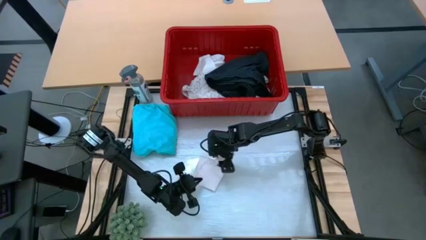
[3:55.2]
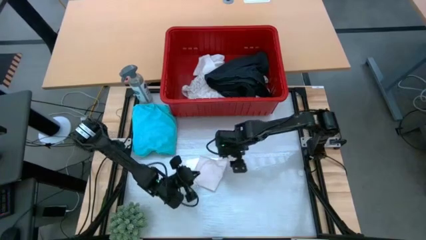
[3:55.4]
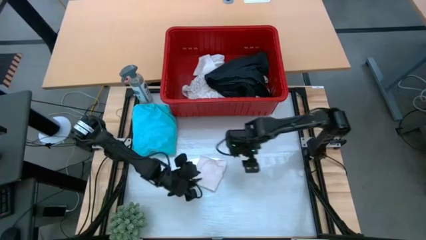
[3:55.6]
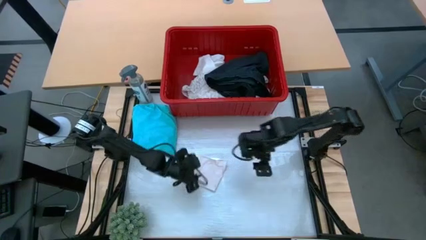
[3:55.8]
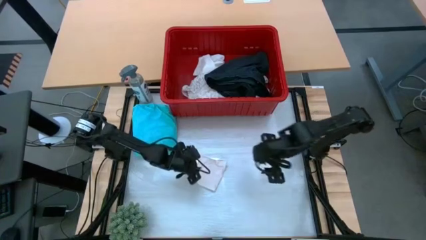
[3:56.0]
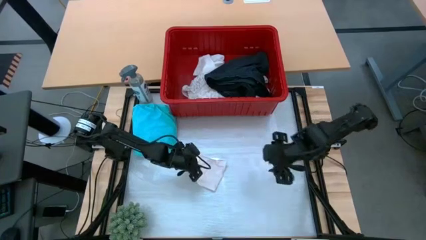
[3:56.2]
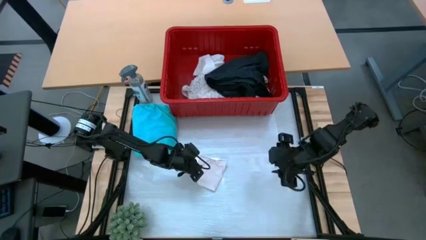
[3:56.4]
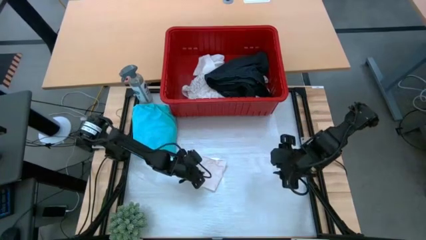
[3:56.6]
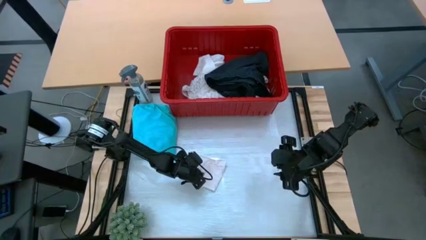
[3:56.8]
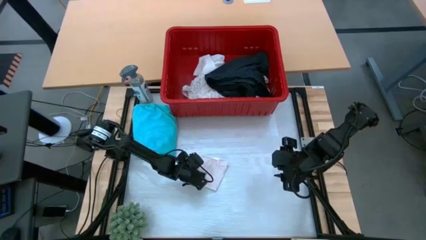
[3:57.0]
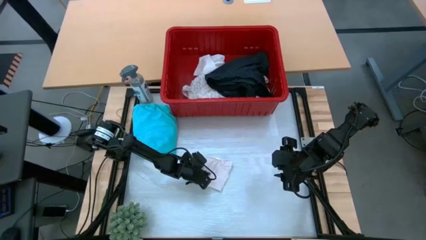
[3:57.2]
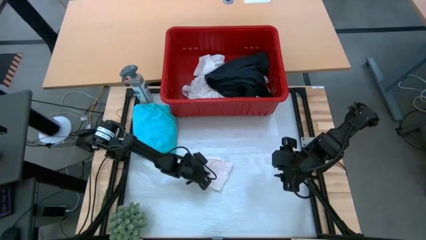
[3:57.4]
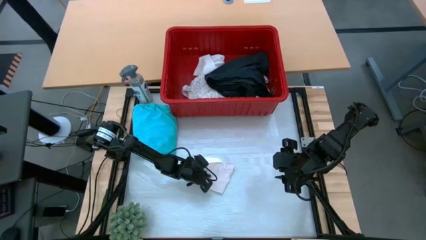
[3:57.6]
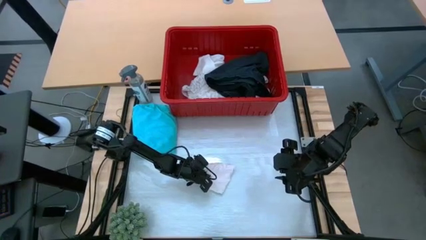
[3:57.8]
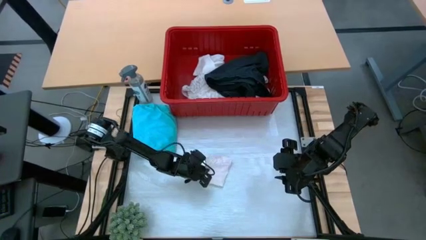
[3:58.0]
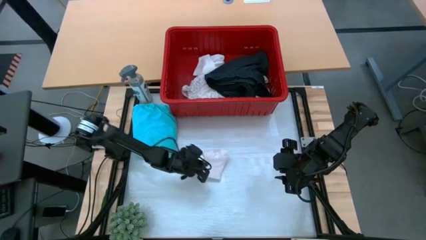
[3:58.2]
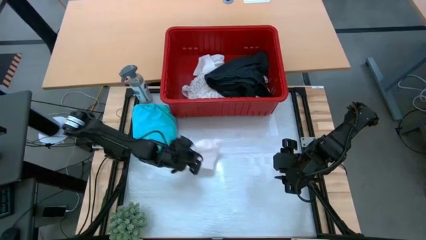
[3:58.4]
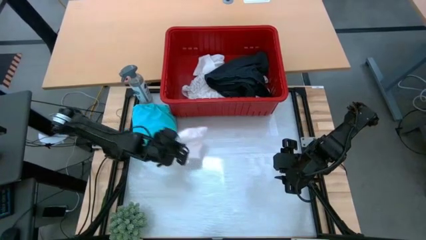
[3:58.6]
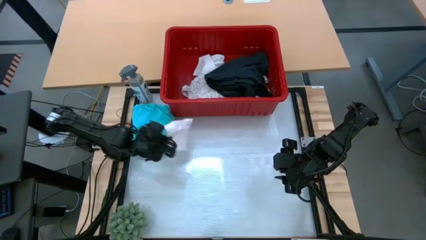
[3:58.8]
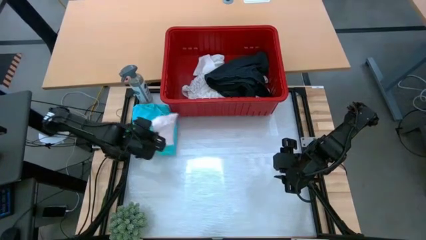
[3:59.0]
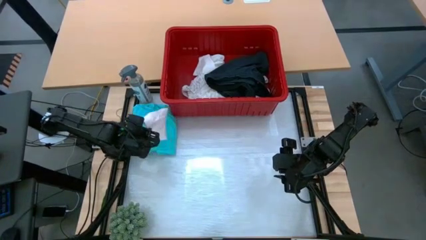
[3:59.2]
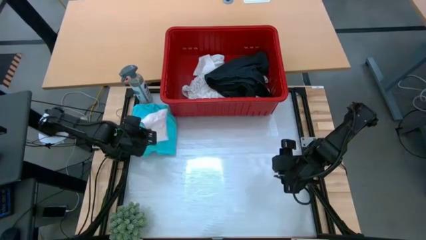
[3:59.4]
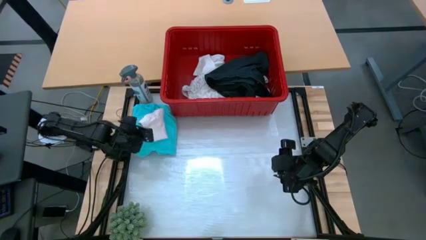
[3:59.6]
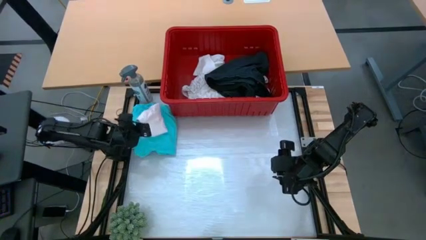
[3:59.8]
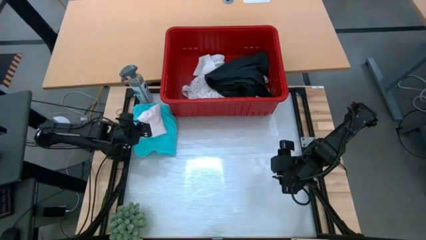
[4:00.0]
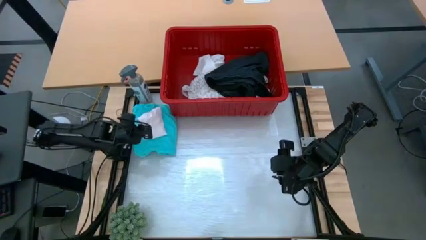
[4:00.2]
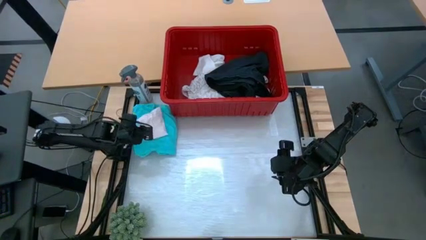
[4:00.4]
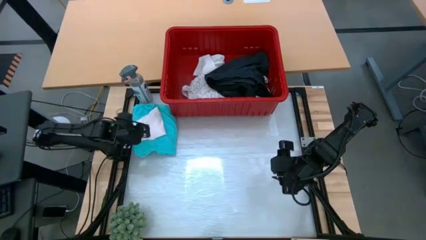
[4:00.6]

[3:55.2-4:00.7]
Task: Fold laundry
Stack the folded white underwear on top of the folded light blue shorts

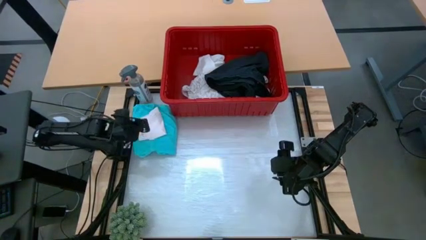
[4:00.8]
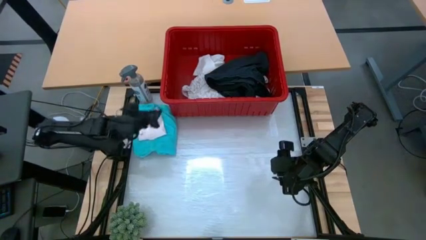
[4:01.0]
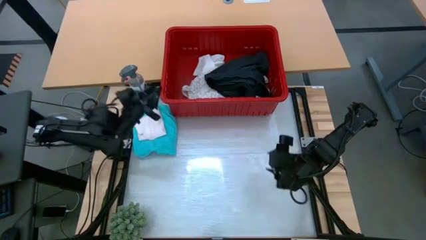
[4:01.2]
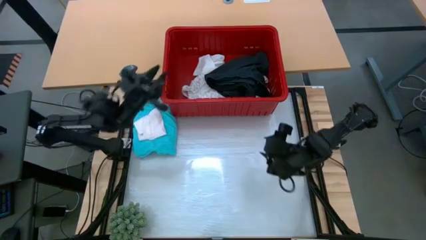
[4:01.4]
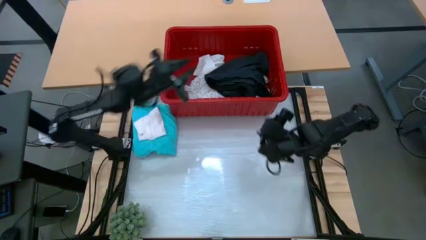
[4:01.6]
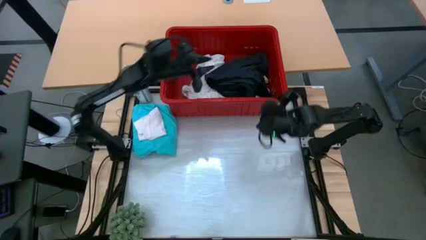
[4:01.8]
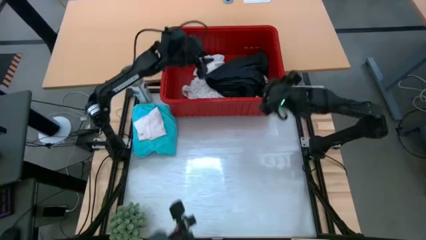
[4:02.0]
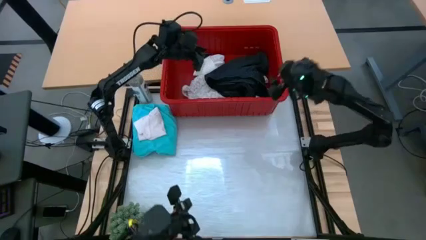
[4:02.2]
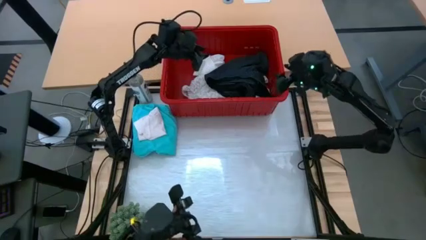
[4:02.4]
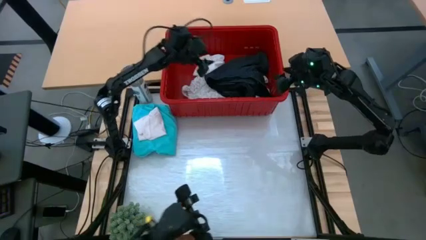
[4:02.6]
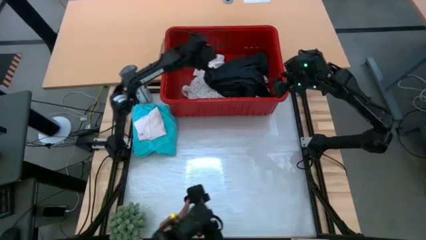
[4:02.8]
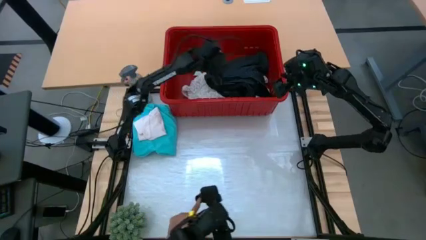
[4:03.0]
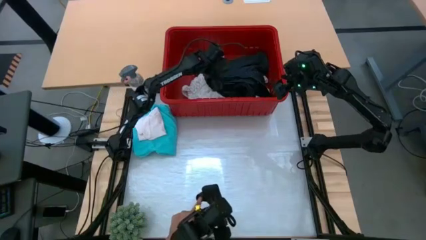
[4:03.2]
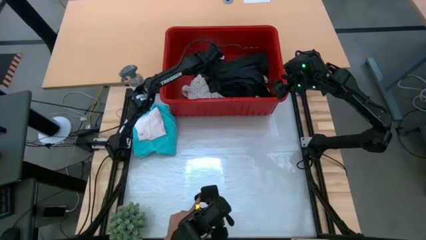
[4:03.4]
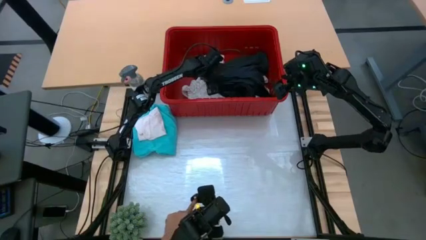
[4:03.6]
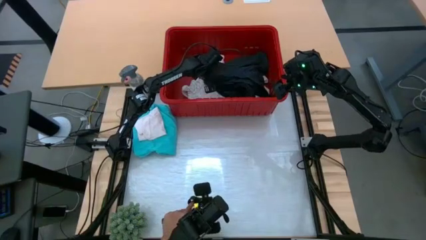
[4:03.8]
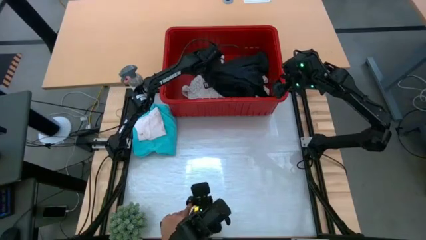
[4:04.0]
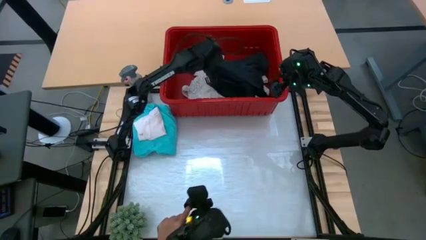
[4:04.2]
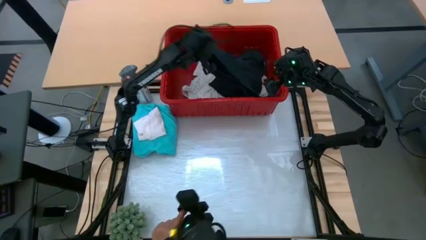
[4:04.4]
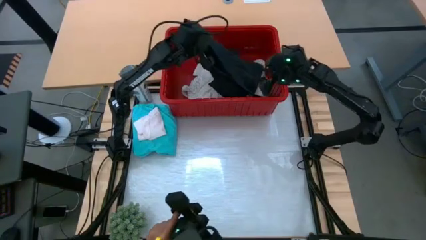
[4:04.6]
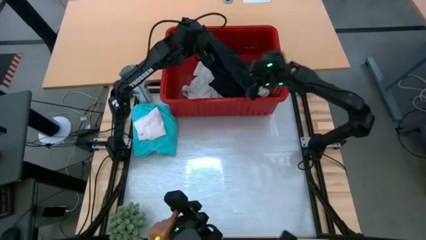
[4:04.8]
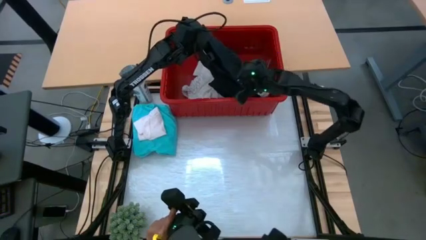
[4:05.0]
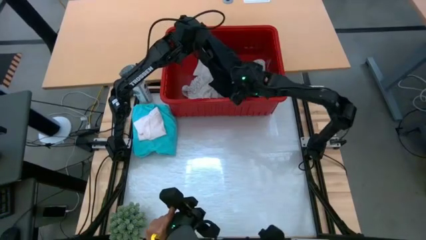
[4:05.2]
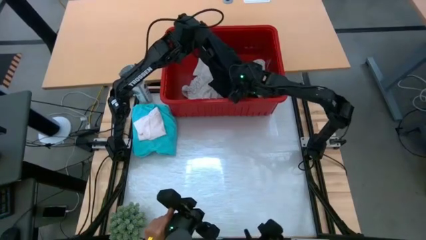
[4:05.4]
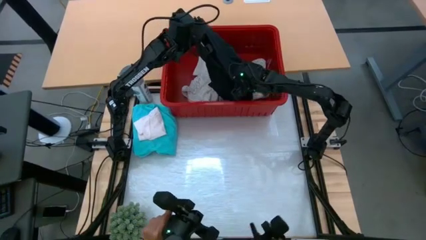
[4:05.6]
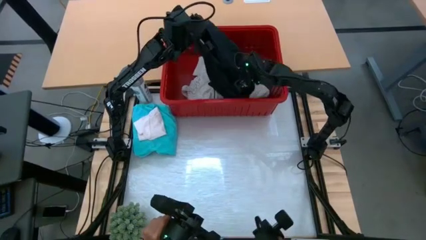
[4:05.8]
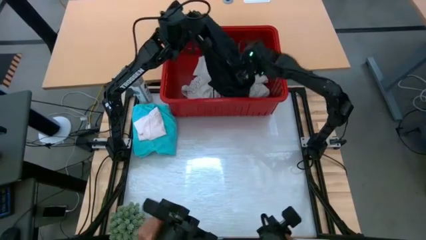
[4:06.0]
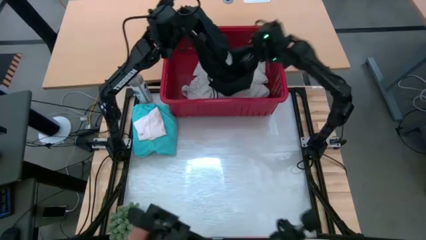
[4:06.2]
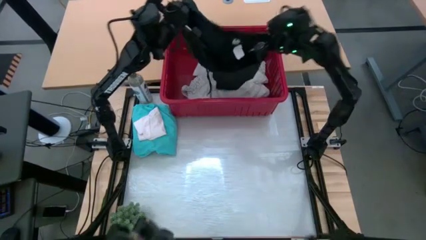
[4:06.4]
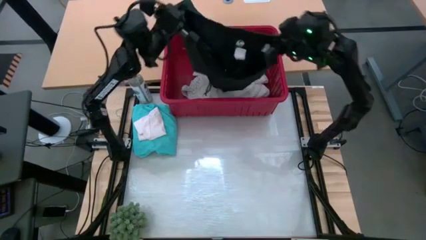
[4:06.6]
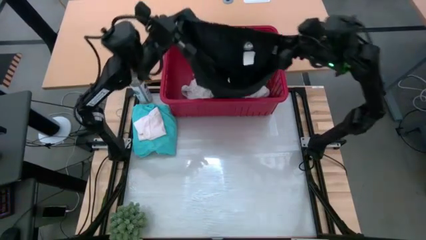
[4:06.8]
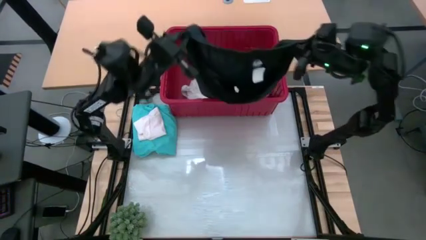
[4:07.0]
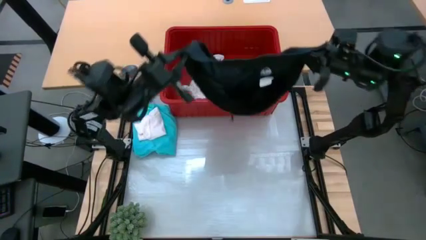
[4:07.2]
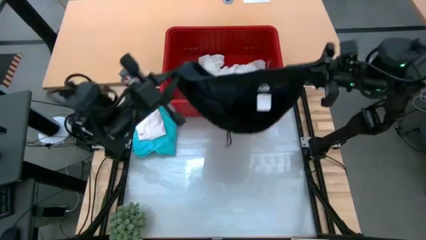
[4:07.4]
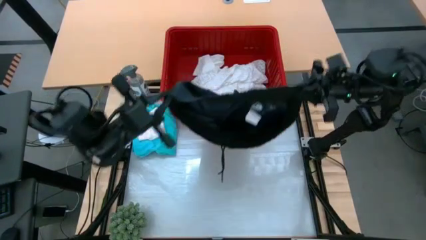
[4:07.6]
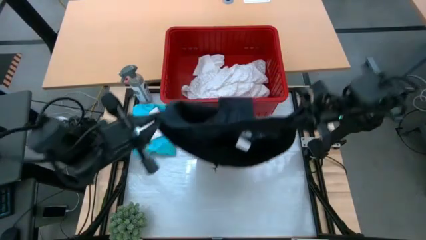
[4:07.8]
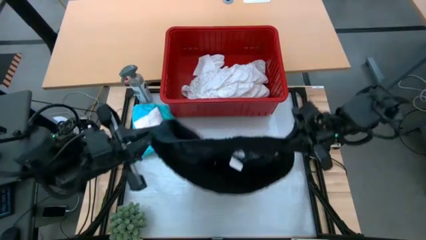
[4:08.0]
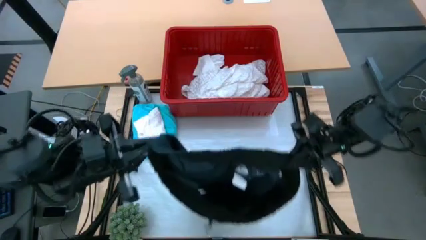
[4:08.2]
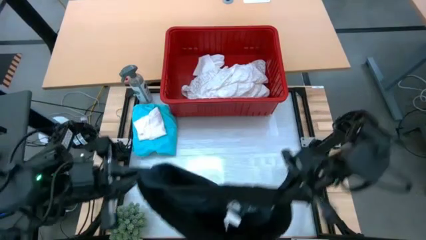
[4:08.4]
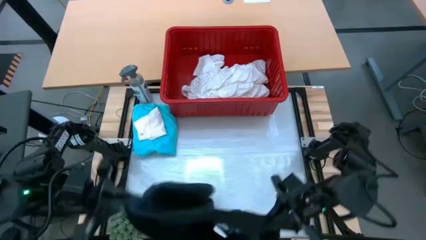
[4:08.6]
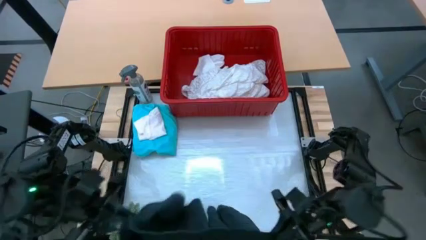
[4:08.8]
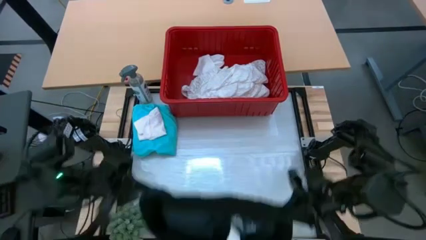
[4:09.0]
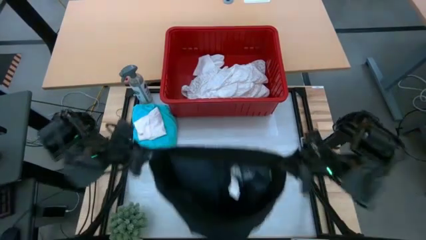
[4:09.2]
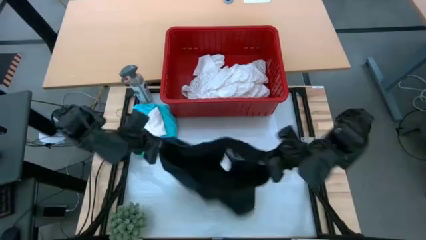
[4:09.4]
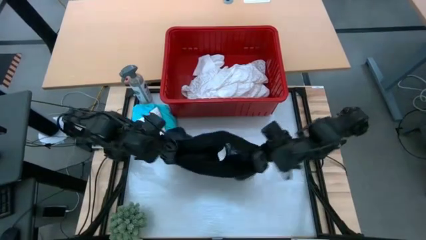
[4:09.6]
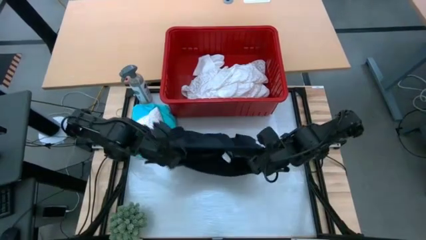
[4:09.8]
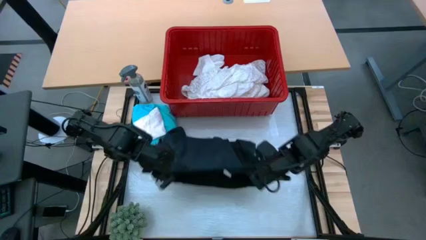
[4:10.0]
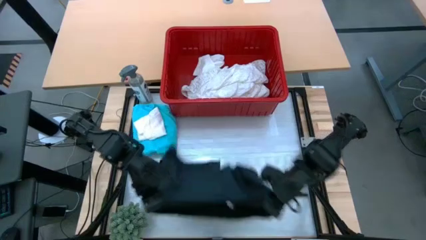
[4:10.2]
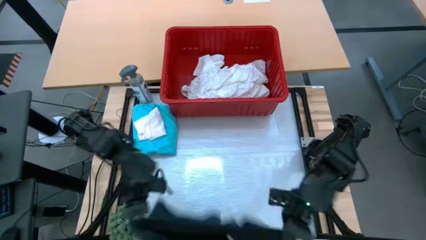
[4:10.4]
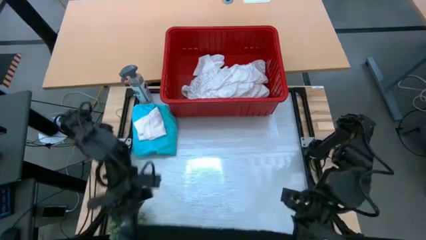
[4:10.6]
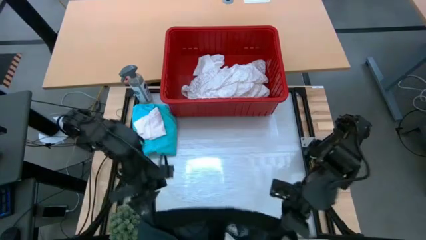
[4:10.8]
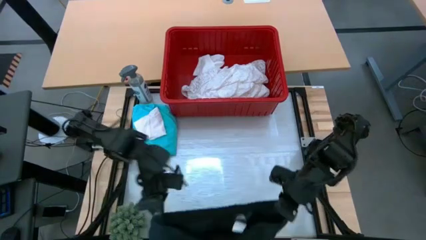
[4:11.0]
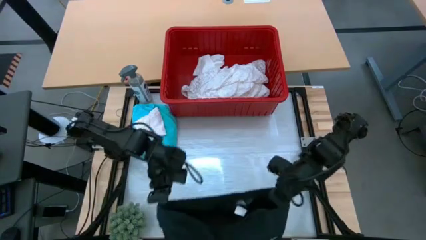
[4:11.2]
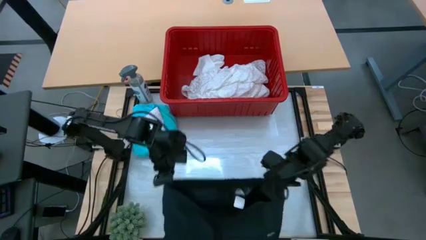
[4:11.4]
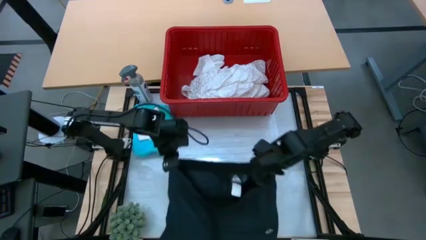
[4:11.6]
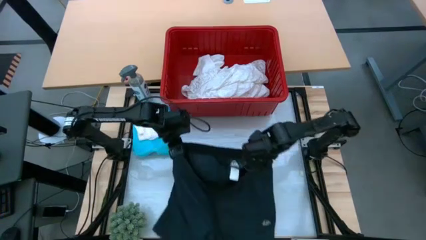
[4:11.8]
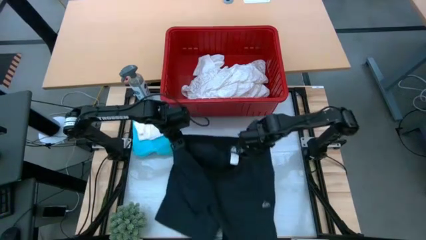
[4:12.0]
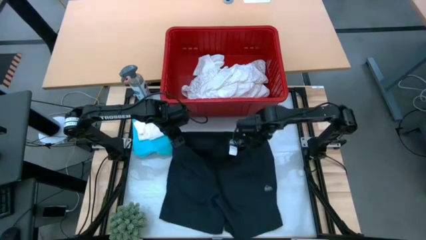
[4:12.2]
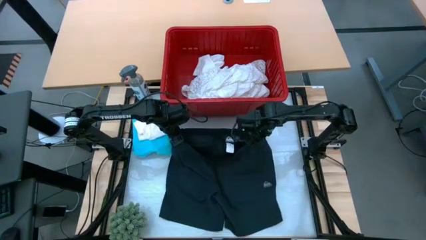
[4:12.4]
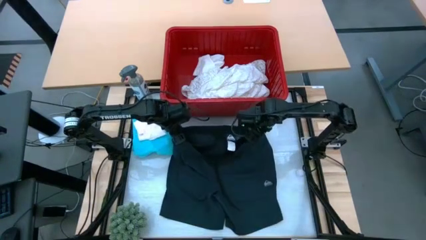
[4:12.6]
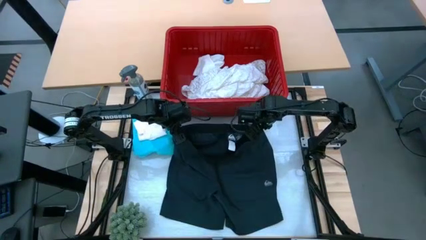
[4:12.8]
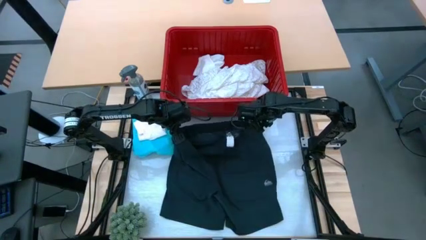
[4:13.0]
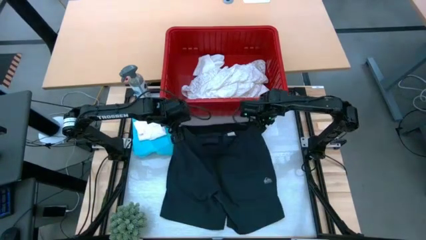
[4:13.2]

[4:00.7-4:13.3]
Fold the black shorts
